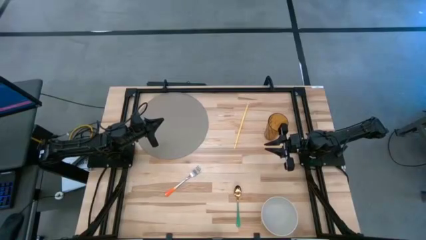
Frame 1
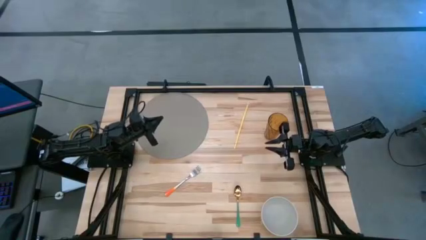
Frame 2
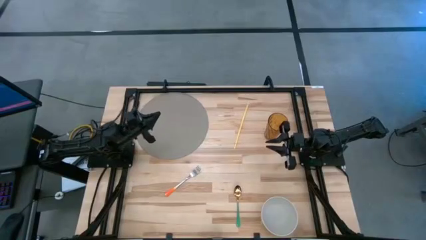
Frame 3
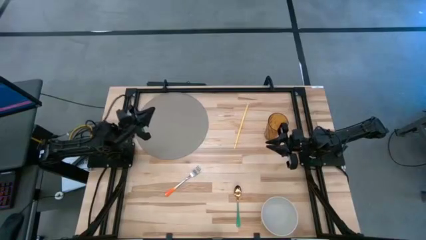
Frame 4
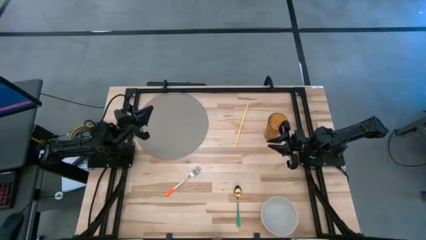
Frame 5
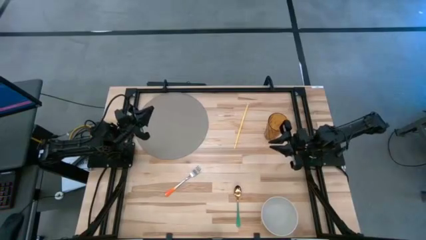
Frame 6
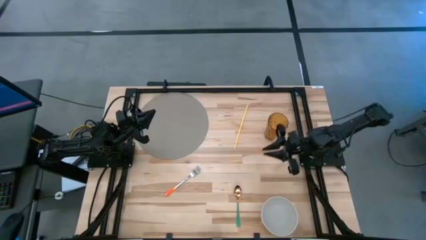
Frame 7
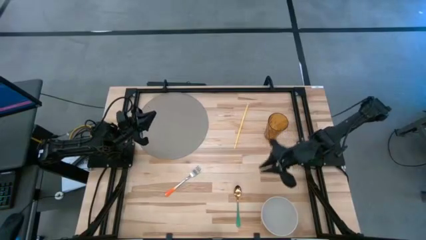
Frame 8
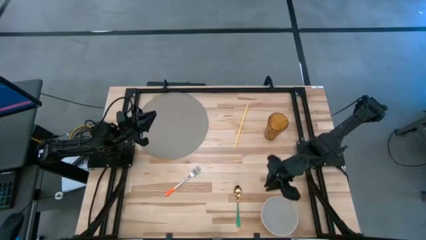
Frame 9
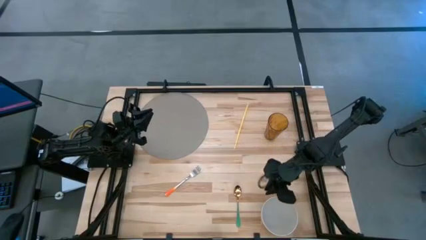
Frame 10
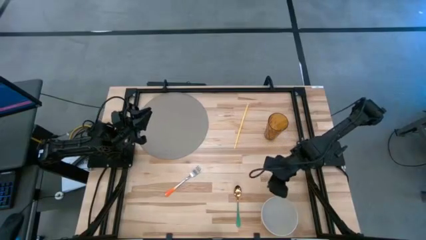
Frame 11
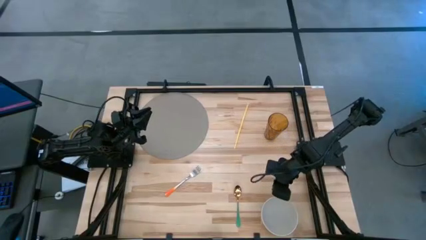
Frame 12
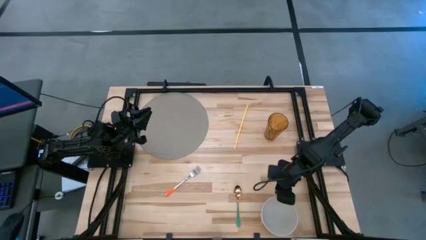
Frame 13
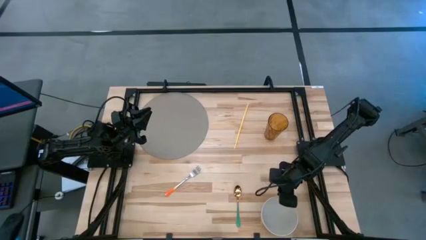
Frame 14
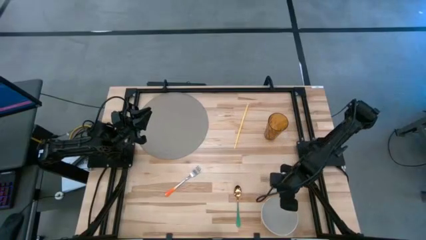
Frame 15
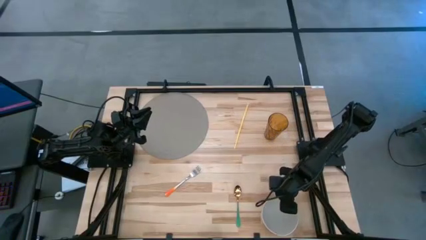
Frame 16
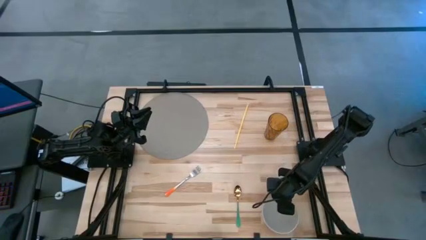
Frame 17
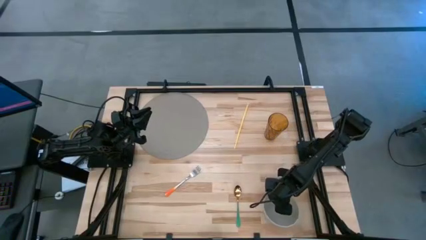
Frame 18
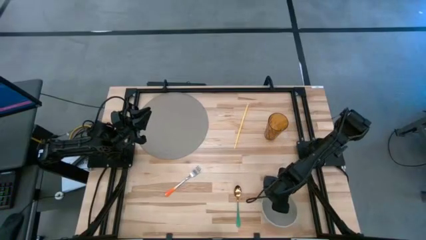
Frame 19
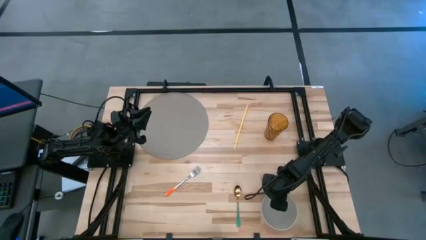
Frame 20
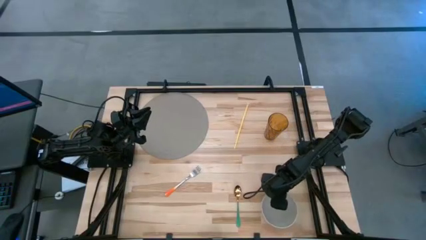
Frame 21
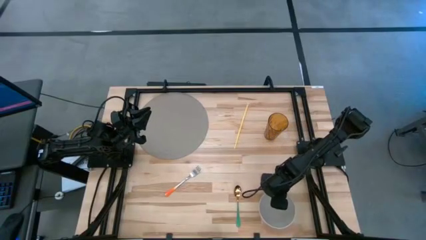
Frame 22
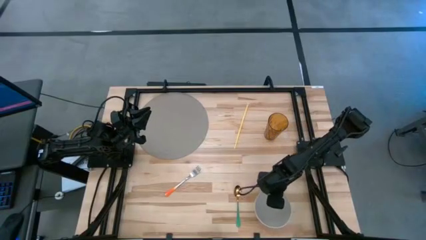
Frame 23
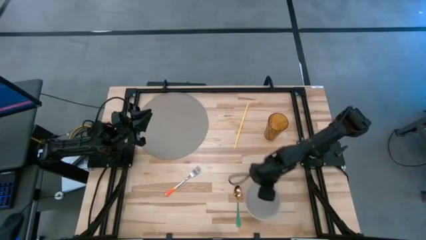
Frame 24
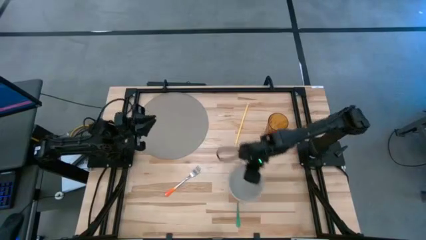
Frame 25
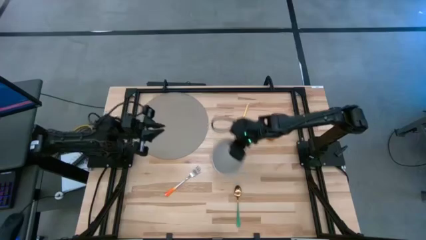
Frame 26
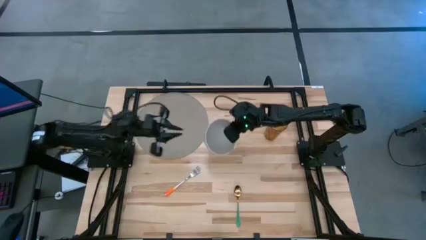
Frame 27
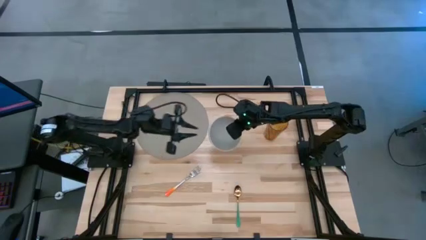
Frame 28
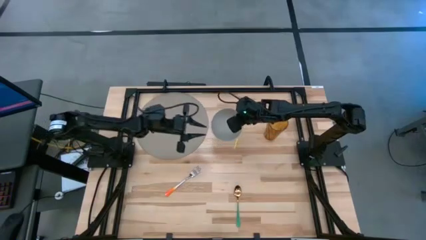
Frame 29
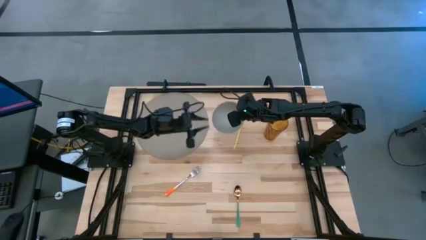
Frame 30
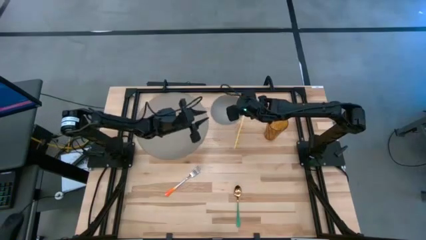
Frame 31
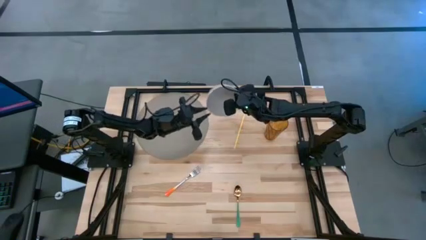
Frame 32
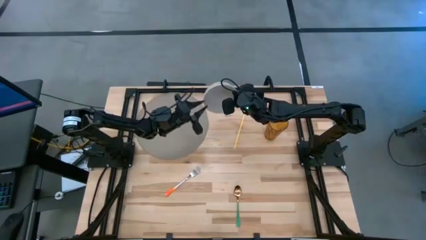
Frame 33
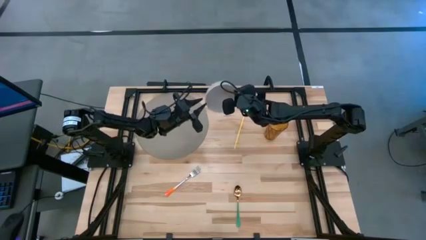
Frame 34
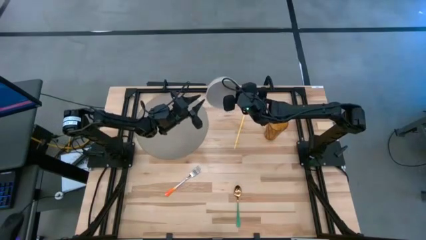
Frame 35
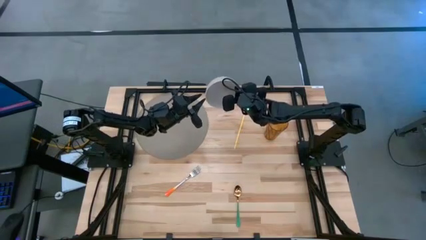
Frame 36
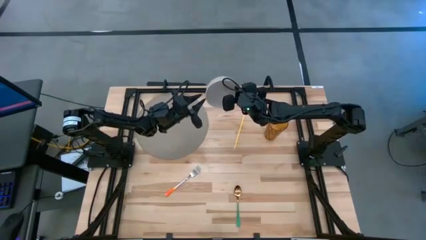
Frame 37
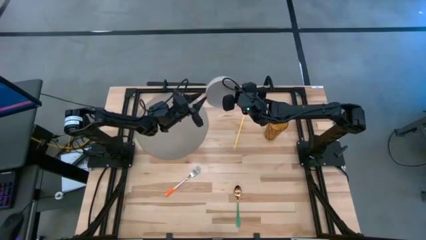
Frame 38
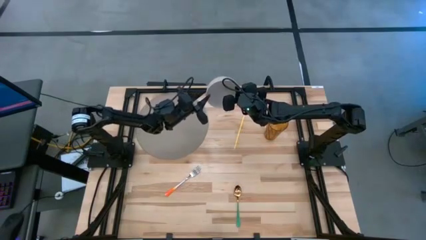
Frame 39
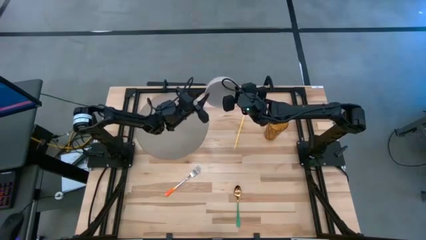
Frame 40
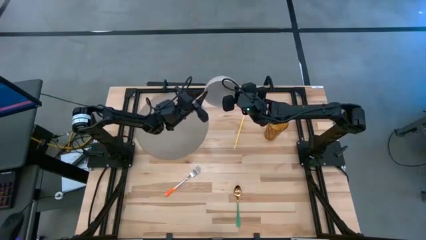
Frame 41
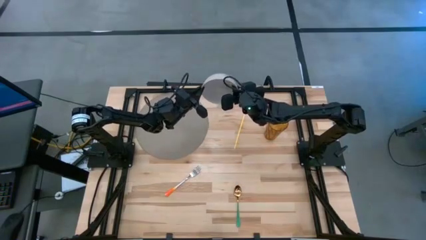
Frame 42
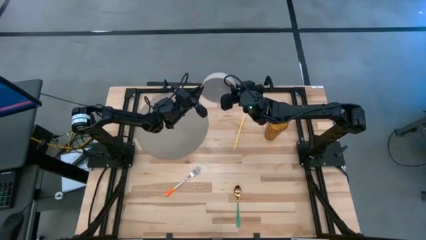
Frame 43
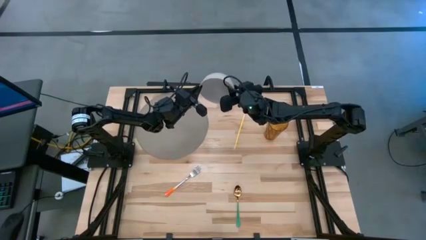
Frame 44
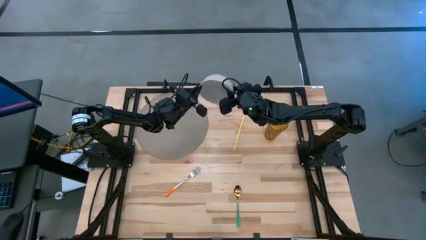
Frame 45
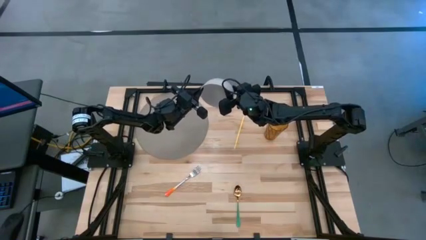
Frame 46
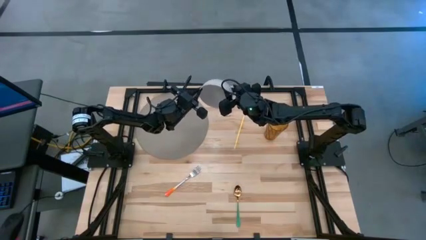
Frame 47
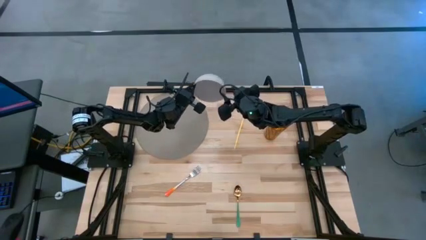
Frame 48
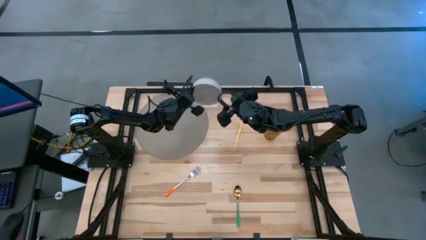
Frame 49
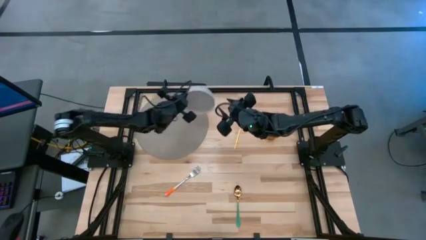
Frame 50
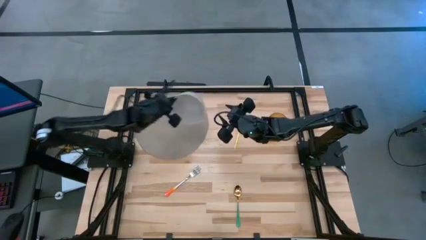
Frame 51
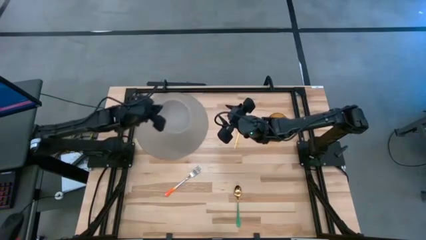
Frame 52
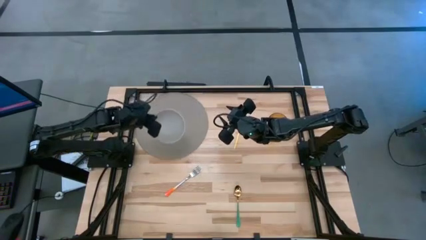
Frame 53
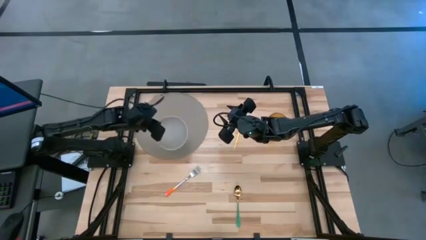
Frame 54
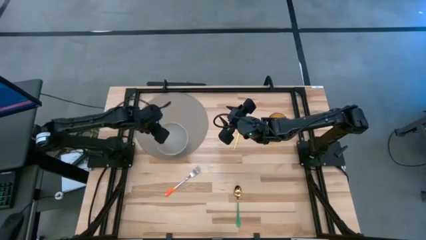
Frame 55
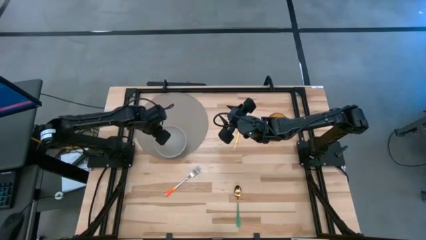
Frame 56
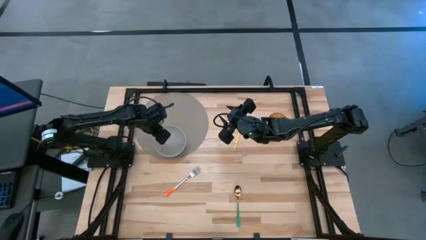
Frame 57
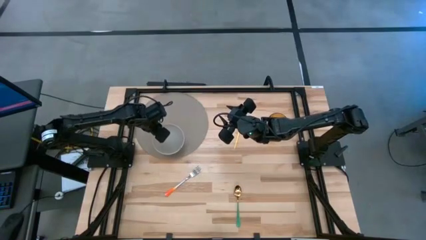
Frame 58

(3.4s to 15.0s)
Task: Pick & Place Utensil
Put the gray bowl on the gray mat

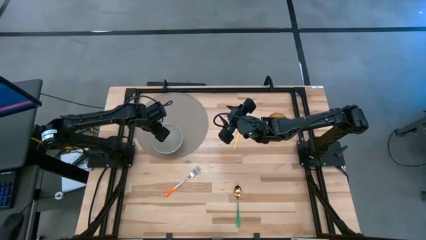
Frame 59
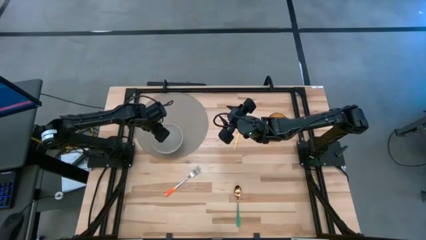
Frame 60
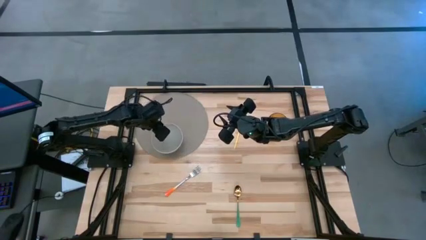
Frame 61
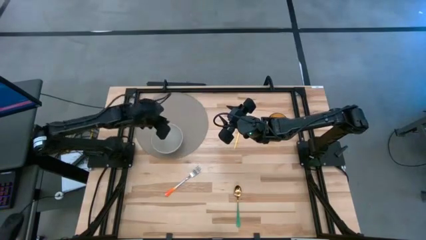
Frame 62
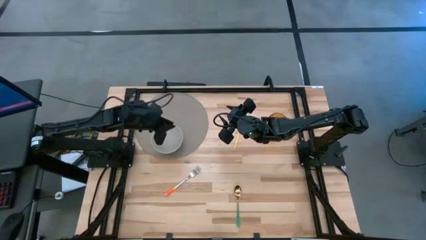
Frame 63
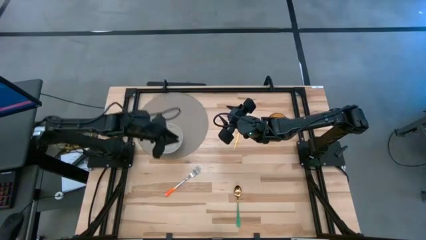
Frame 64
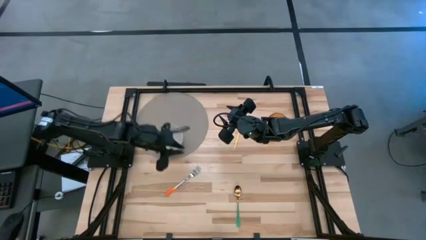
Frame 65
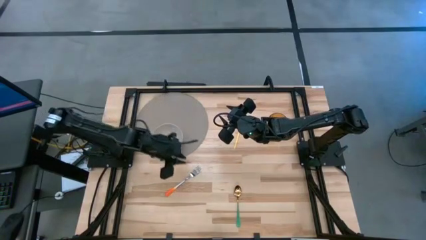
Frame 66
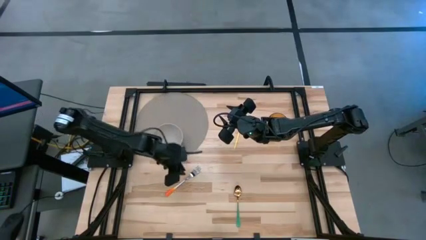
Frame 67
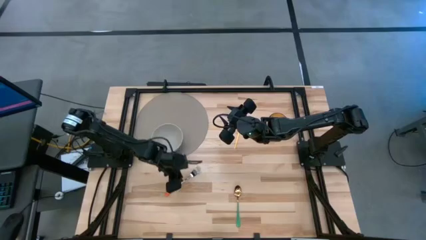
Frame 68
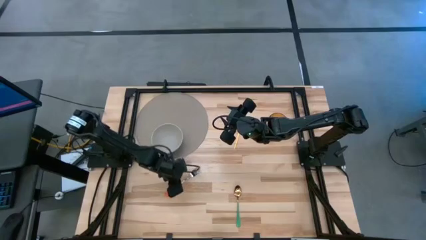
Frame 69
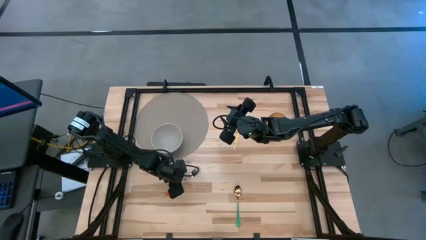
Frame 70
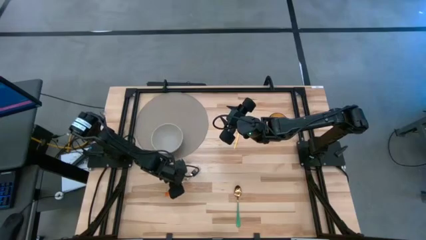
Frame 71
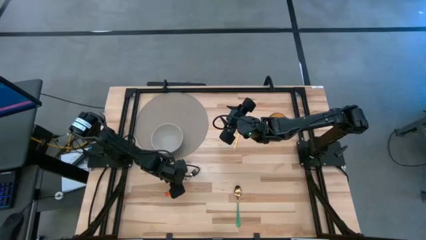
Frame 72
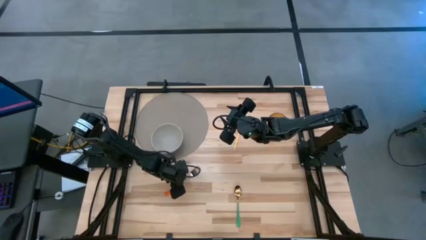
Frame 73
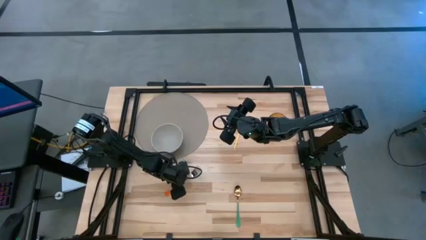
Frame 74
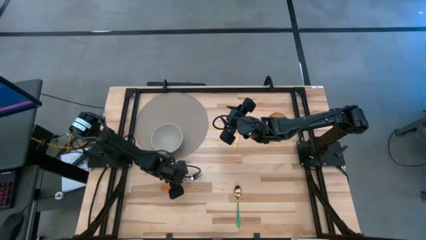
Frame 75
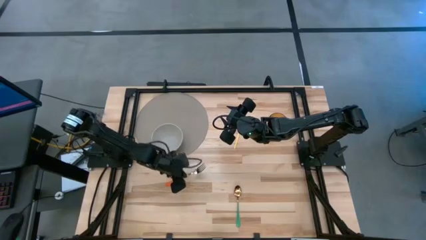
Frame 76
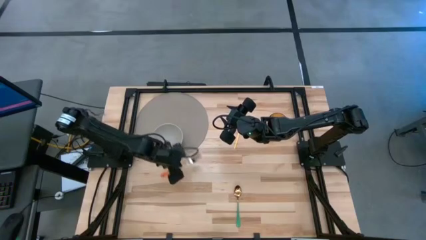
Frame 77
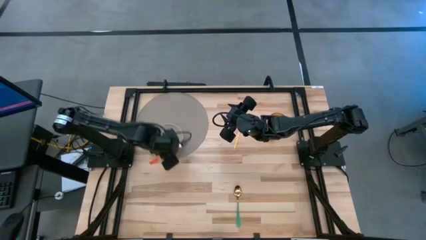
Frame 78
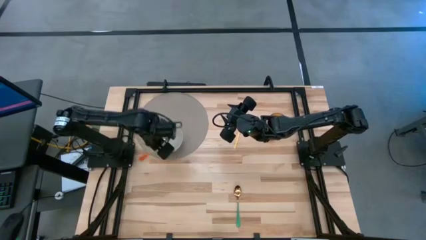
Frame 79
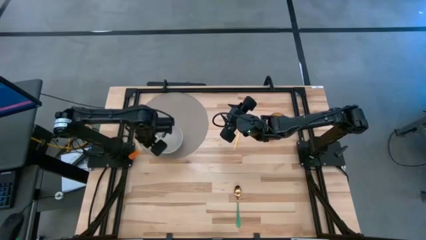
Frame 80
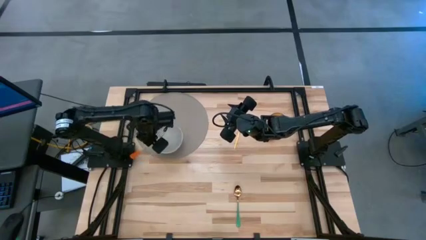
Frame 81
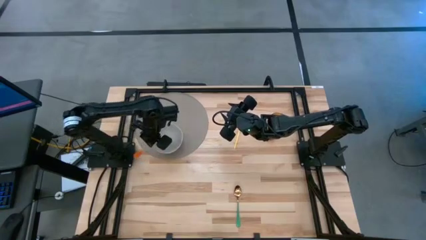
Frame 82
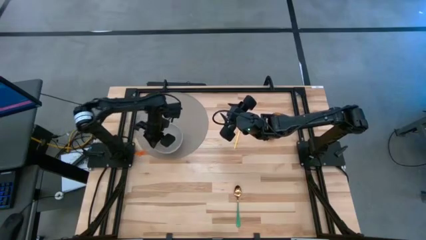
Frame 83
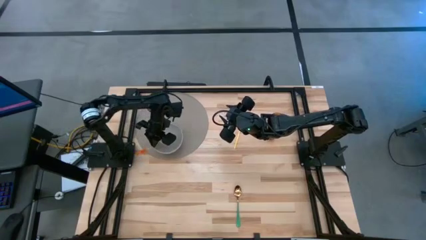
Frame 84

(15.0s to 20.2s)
Put the orange fork into the gray bowl on the gray mat
